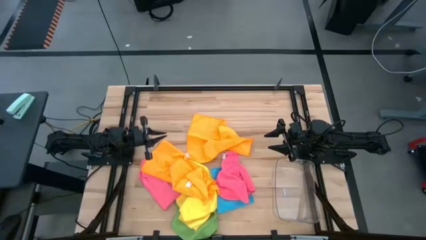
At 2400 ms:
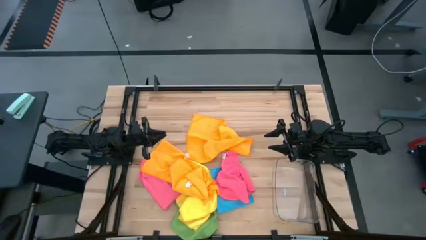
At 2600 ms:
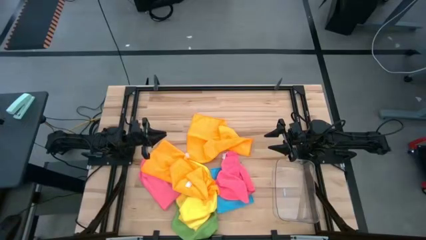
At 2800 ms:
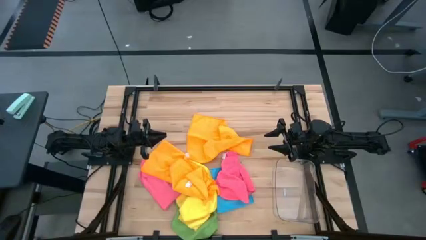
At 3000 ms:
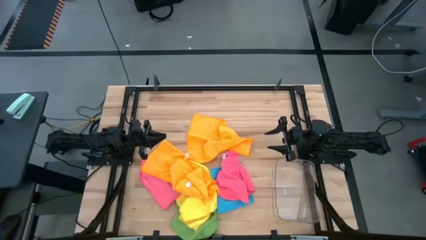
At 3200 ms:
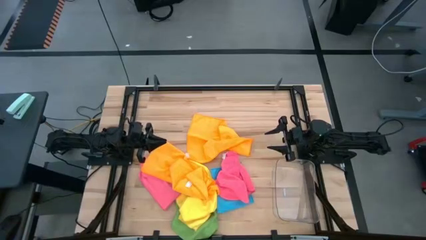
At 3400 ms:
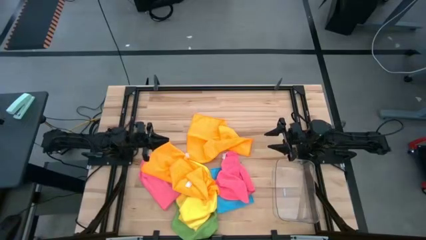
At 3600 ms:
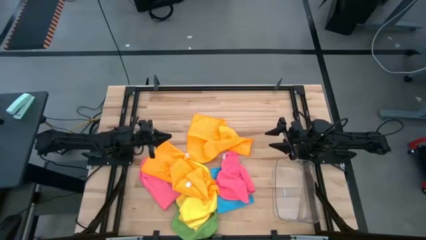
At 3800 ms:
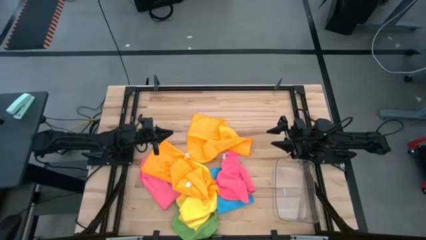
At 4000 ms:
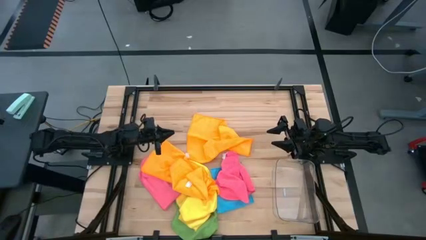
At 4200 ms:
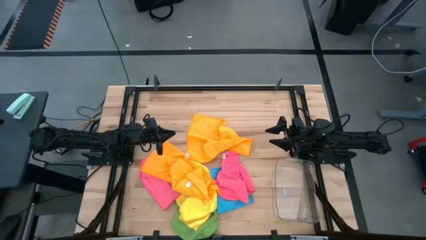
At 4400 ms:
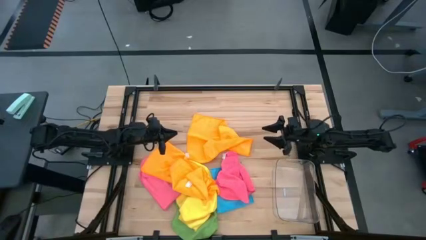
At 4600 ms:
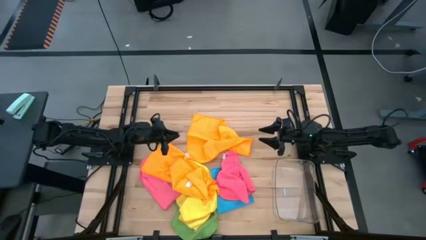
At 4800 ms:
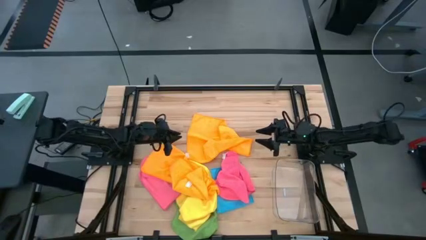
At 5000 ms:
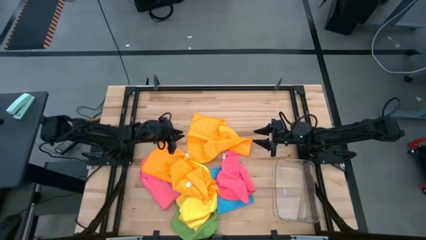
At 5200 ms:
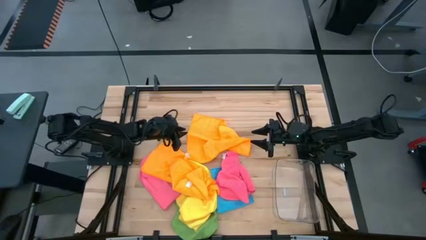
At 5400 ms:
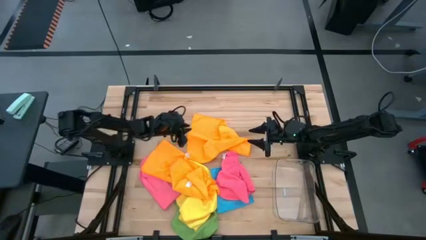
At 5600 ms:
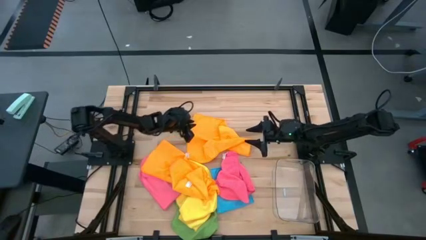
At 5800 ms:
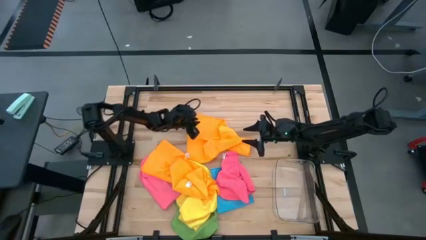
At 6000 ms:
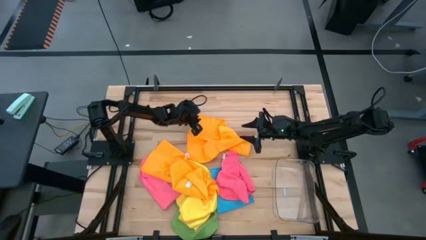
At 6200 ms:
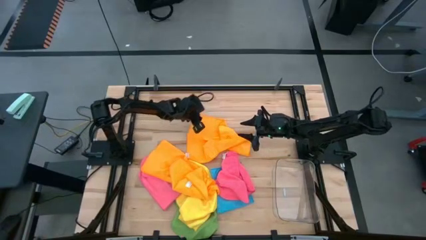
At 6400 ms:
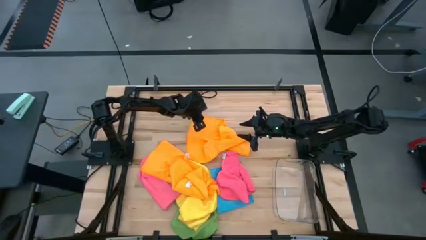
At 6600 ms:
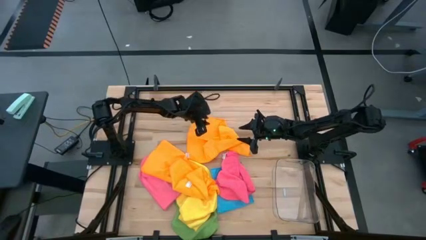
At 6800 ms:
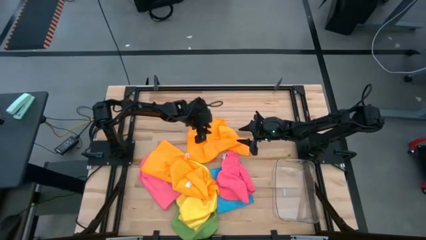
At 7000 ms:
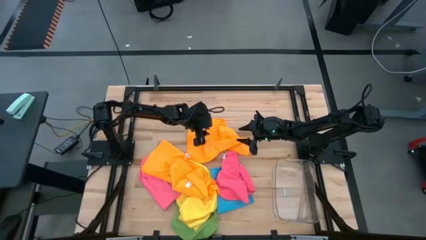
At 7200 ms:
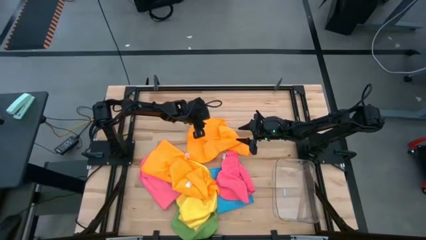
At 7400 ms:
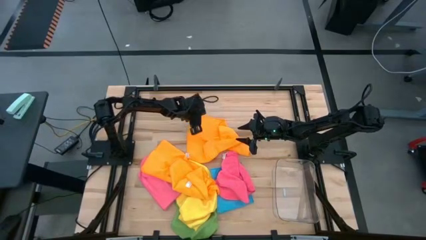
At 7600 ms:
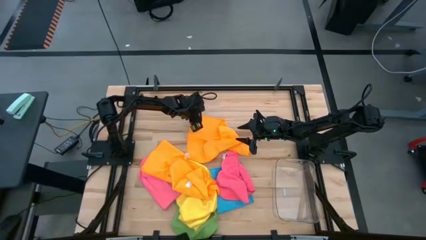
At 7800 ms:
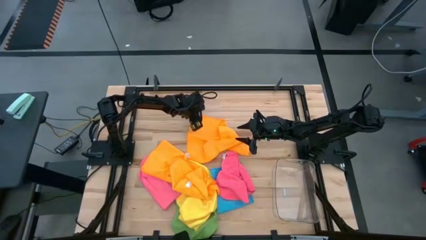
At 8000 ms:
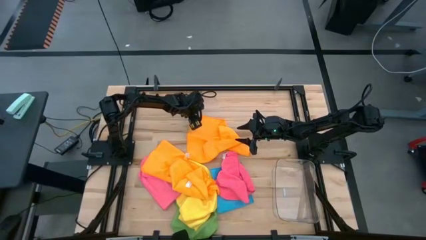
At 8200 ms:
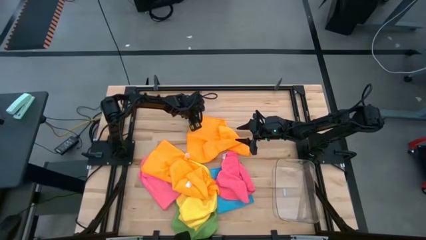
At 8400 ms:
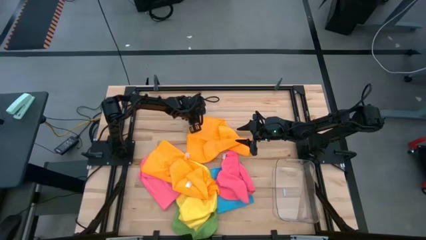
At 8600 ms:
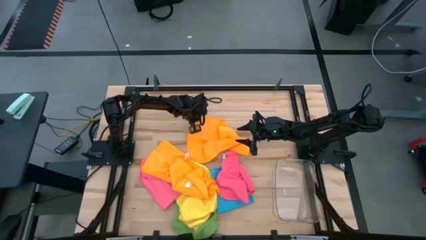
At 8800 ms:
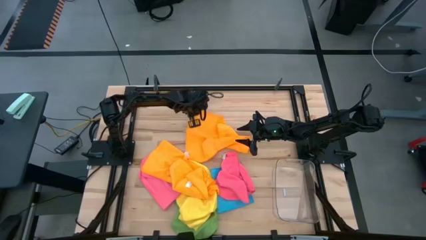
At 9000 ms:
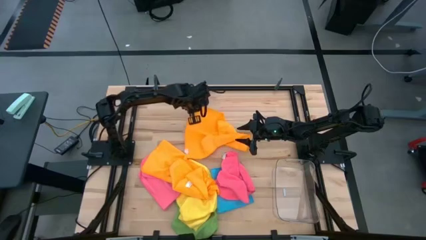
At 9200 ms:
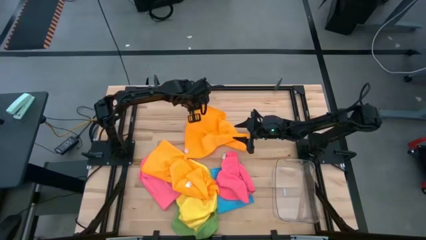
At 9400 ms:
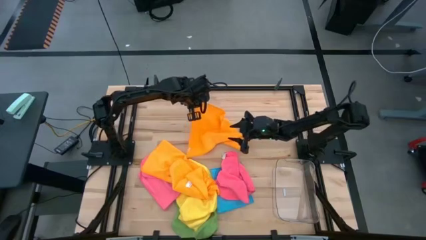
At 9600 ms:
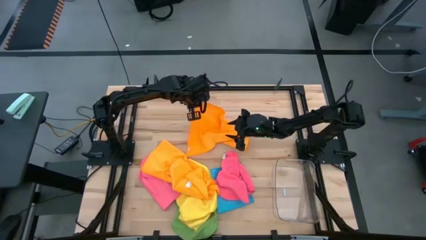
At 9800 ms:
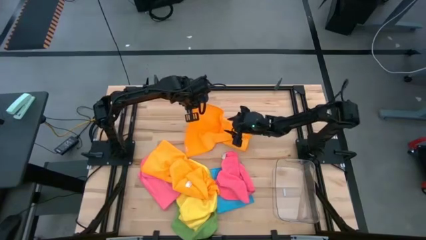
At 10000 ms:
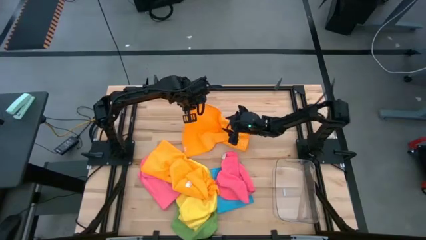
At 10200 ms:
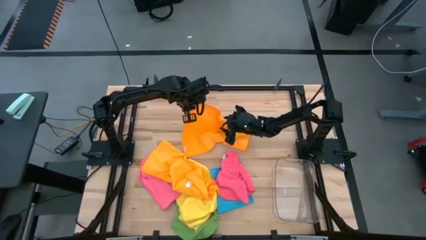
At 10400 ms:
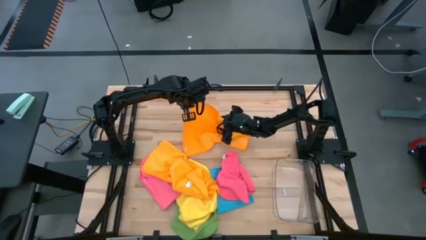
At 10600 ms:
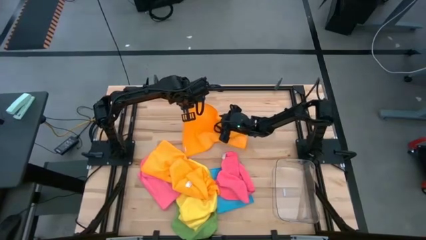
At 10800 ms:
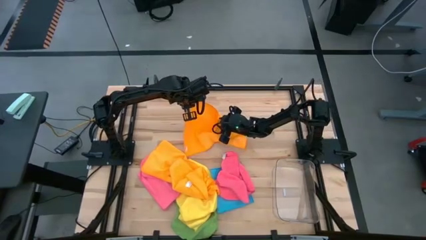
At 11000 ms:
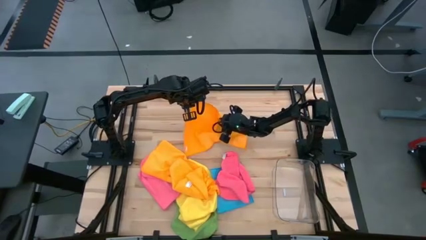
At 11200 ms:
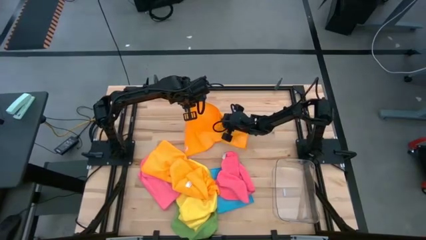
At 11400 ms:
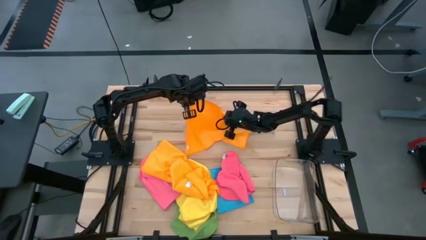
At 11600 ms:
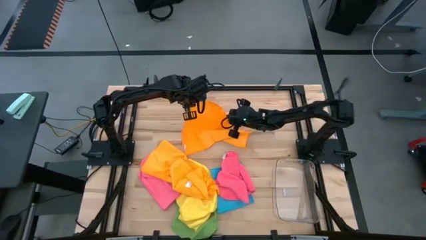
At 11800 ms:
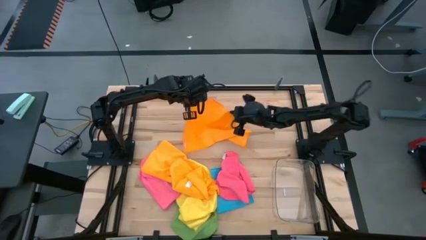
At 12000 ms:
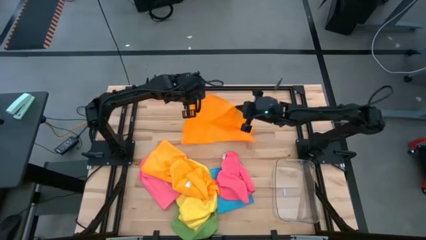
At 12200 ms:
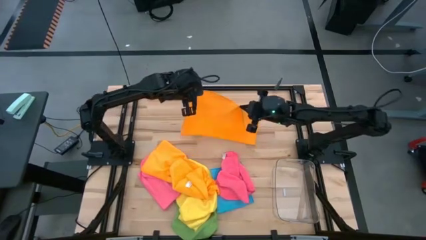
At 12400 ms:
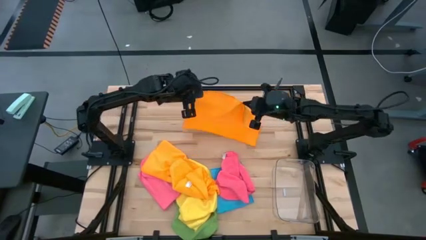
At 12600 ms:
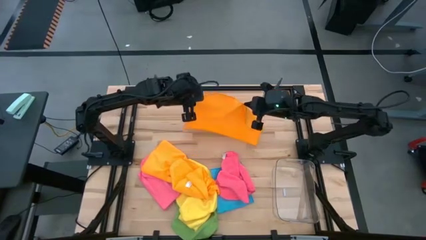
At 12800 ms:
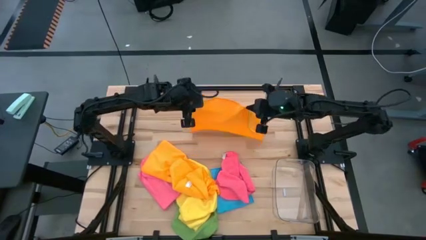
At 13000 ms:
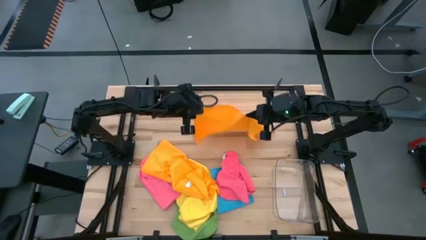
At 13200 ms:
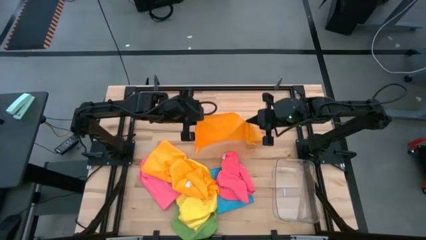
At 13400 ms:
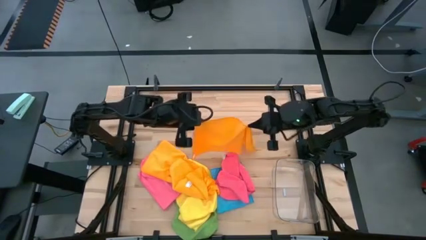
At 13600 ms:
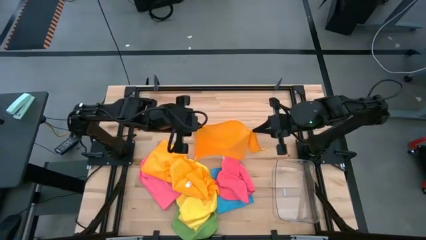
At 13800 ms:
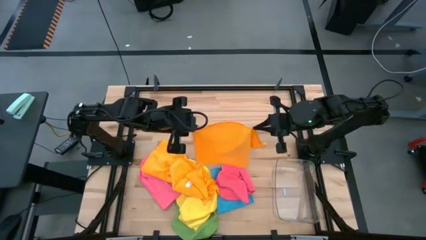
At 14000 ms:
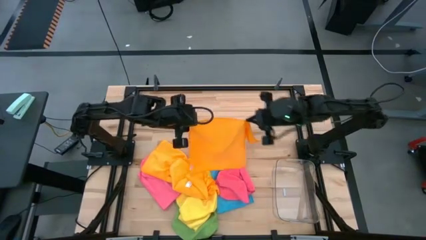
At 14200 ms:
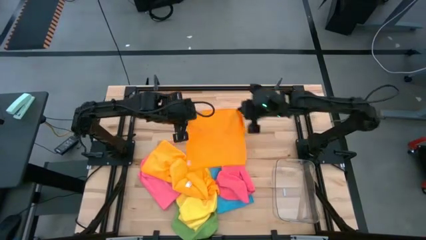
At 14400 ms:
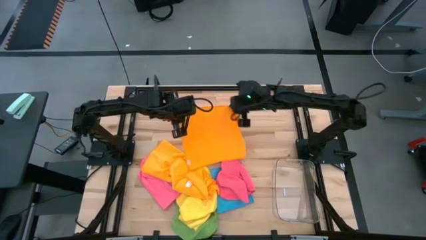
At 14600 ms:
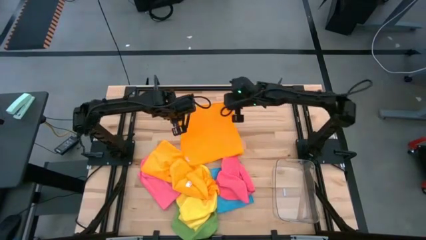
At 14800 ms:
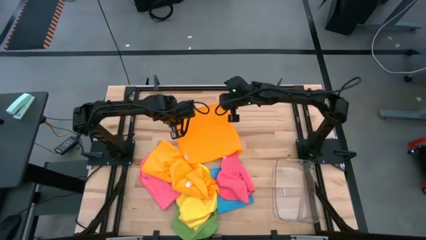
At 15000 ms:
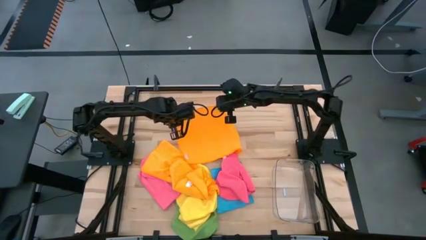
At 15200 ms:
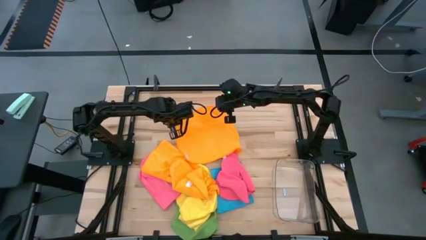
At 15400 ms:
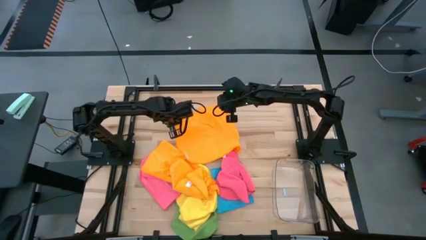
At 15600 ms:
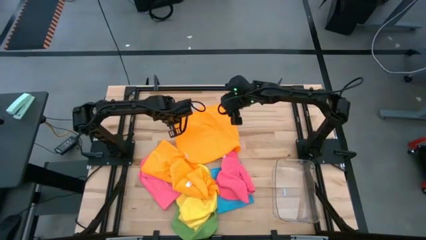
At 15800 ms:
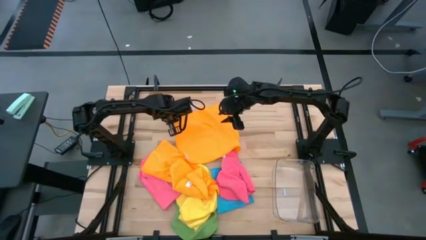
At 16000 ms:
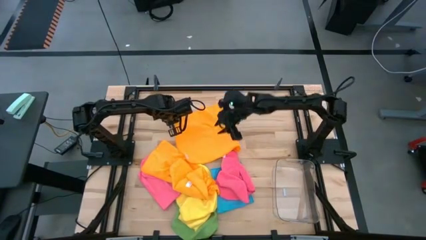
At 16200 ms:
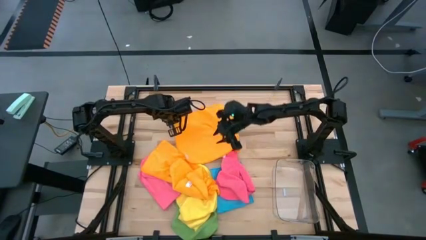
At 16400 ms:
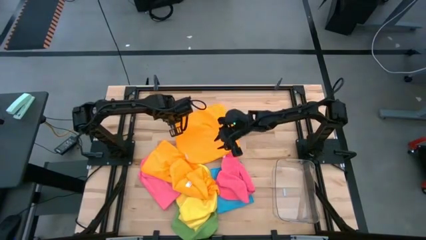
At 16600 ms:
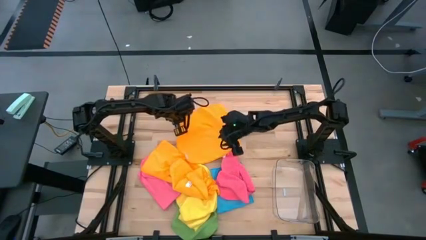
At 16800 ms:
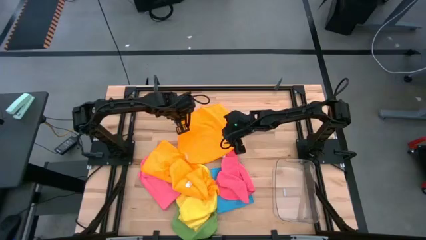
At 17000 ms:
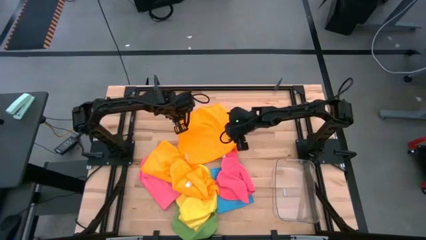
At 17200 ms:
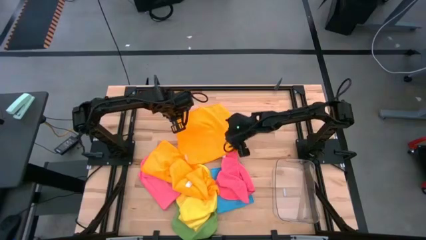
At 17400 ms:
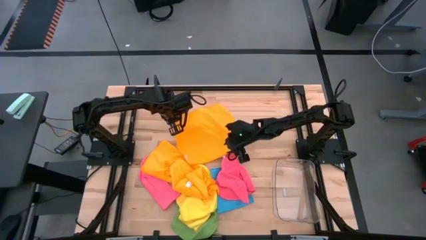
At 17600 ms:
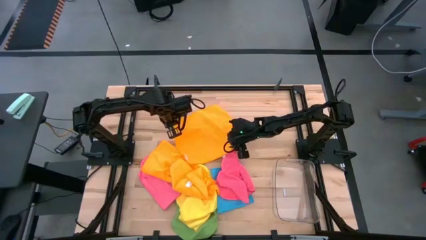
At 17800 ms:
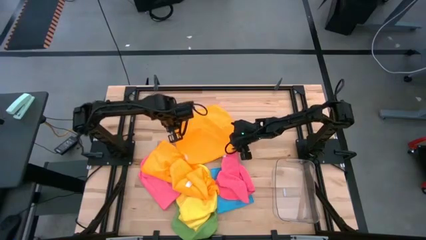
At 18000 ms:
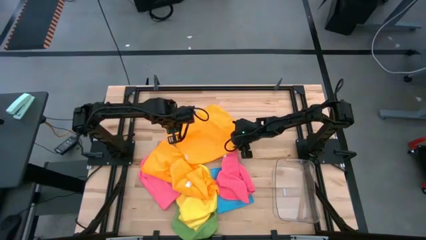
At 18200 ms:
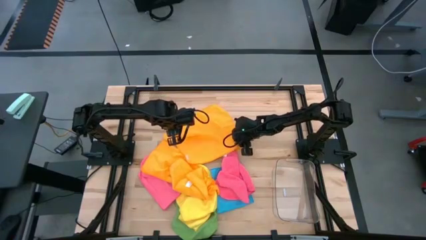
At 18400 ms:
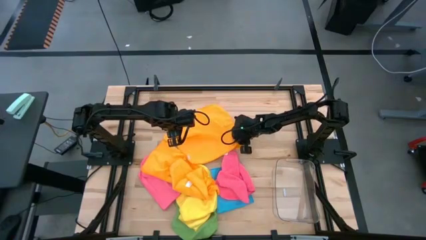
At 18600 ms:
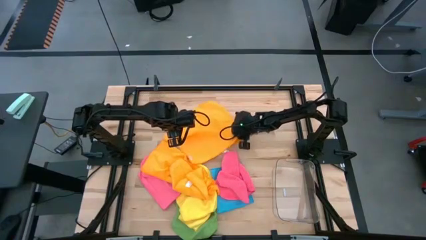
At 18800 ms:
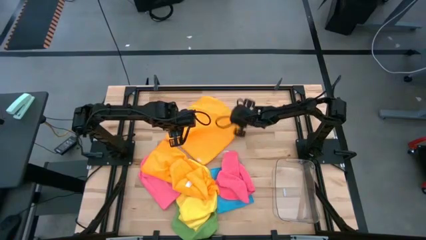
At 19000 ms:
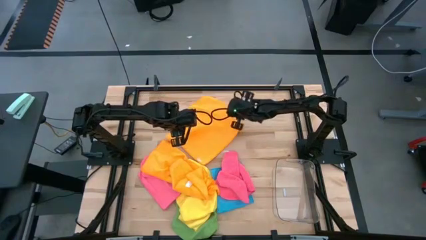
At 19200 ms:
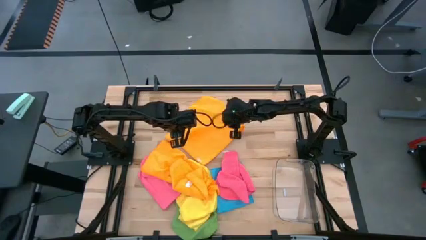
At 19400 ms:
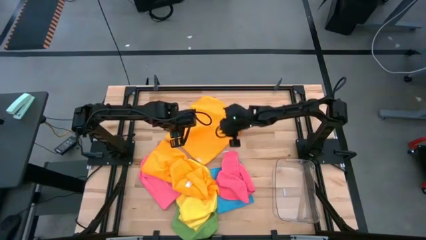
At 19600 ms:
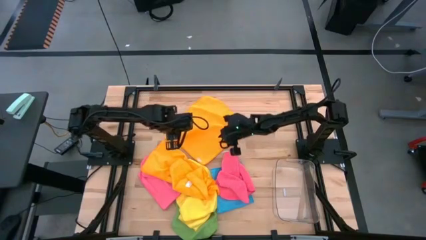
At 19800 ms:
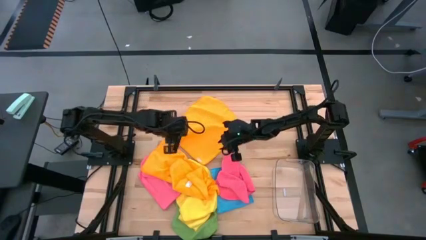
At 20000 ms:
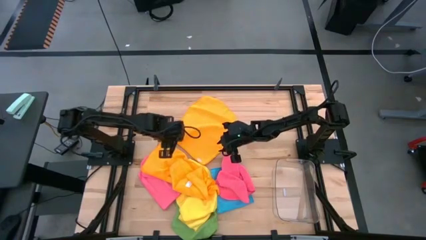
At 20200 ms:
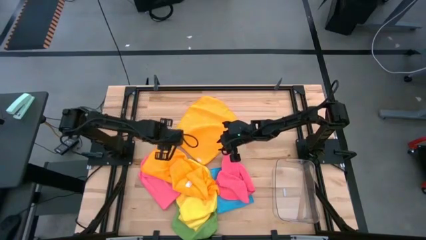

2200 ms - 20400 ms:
Task: Fold microfiber towels
Fold the orange towel
